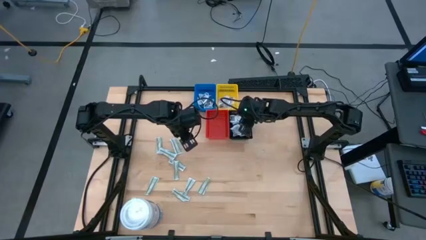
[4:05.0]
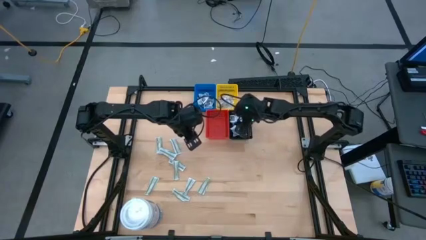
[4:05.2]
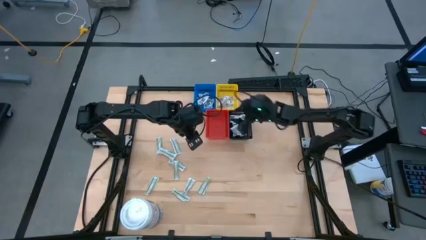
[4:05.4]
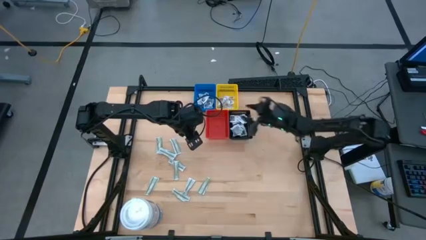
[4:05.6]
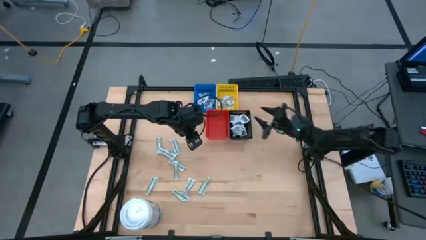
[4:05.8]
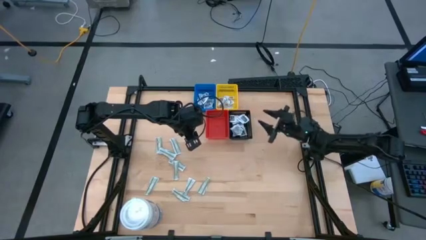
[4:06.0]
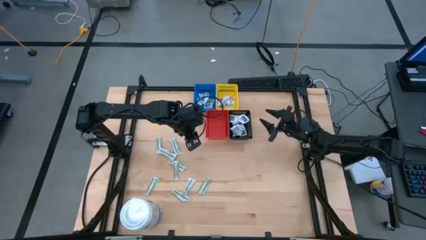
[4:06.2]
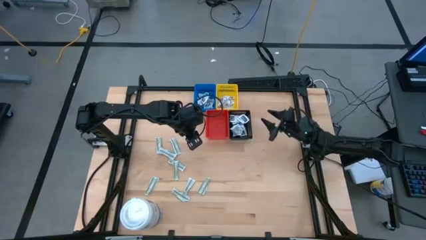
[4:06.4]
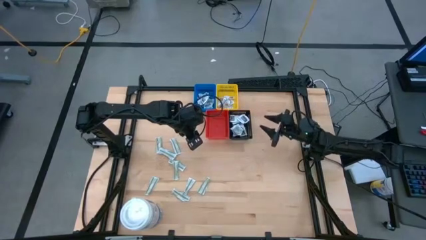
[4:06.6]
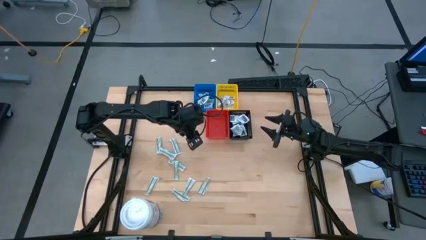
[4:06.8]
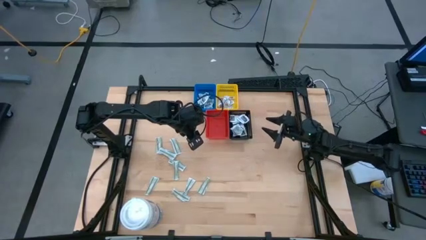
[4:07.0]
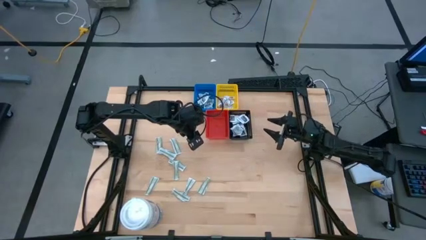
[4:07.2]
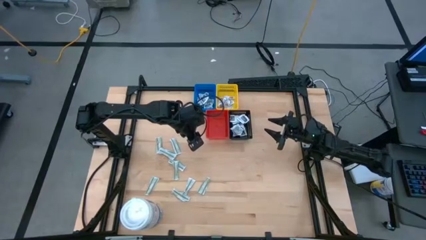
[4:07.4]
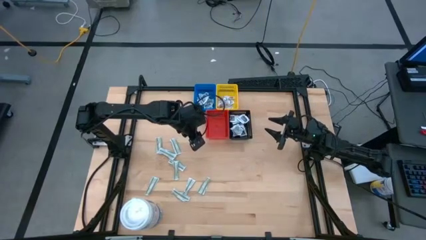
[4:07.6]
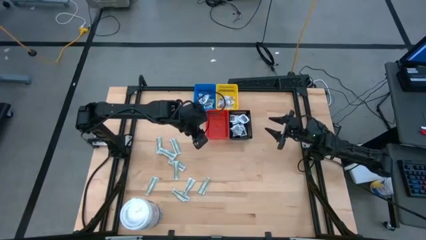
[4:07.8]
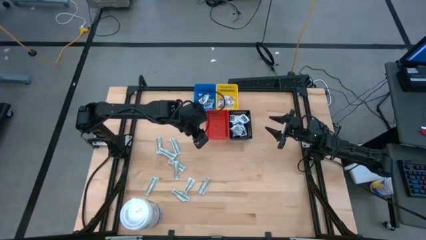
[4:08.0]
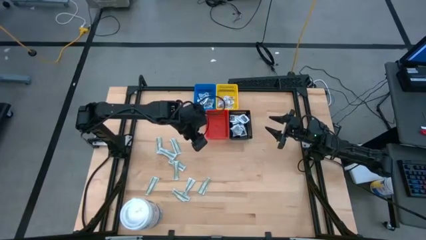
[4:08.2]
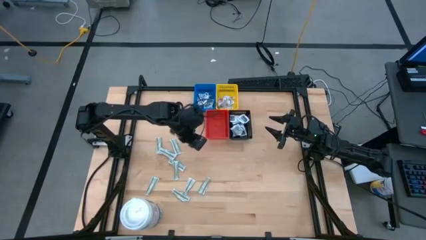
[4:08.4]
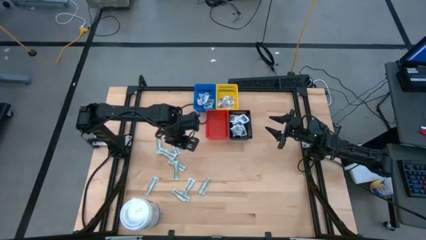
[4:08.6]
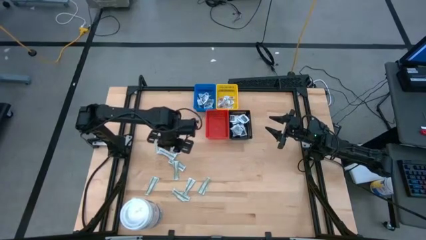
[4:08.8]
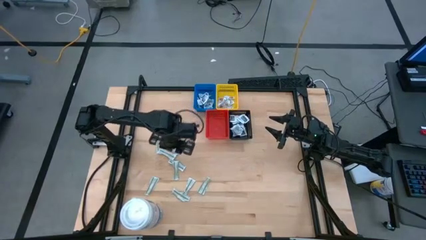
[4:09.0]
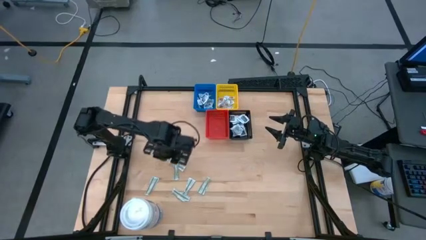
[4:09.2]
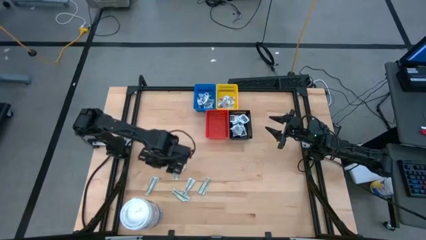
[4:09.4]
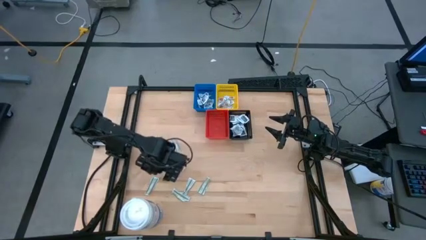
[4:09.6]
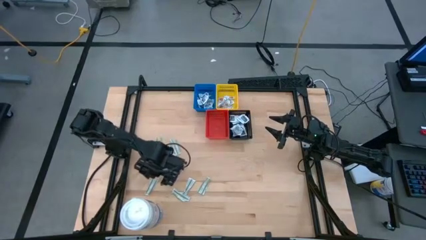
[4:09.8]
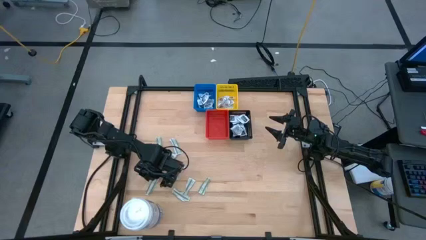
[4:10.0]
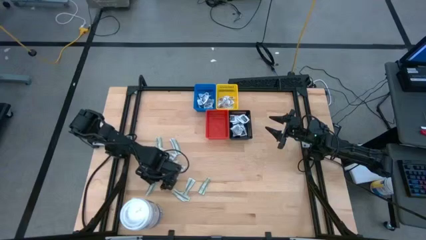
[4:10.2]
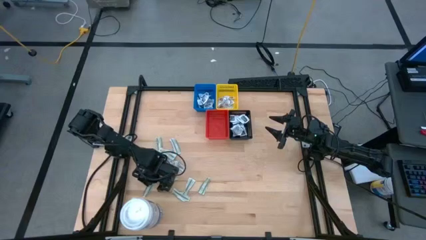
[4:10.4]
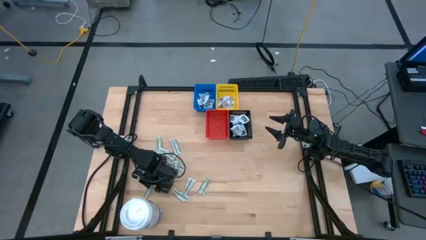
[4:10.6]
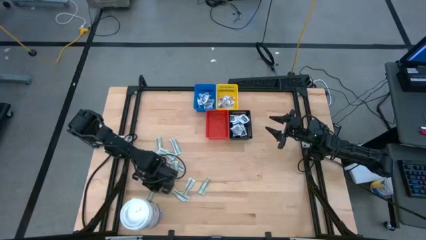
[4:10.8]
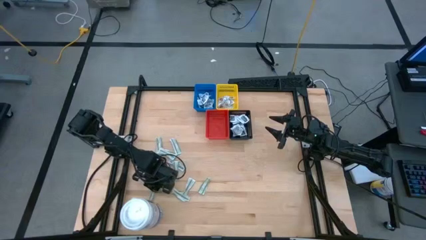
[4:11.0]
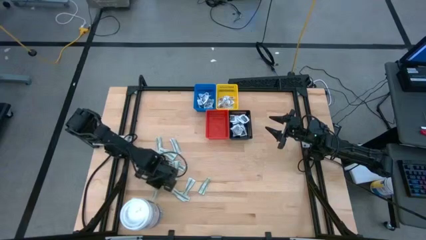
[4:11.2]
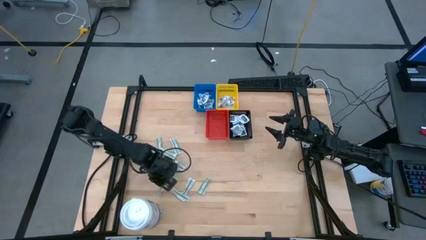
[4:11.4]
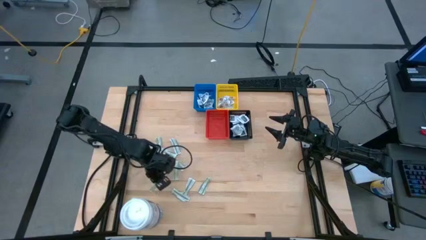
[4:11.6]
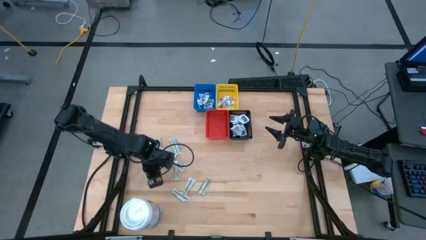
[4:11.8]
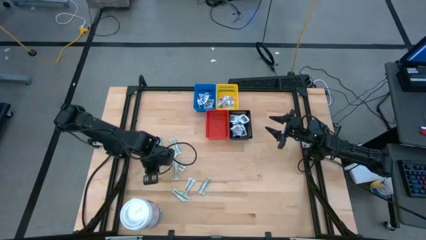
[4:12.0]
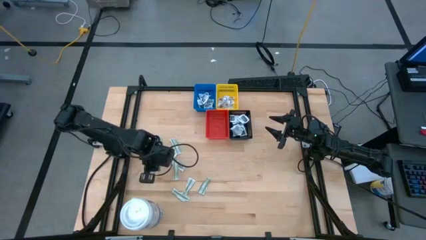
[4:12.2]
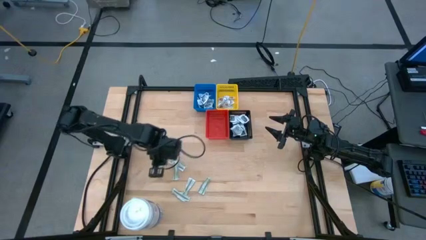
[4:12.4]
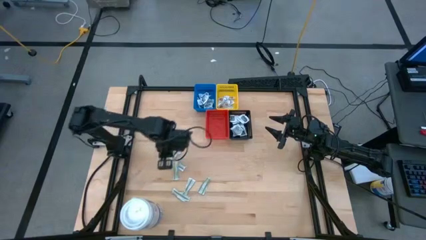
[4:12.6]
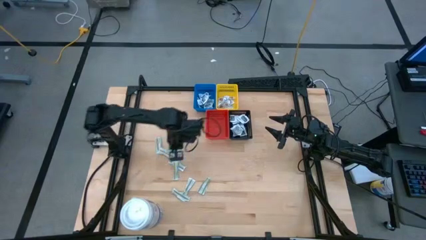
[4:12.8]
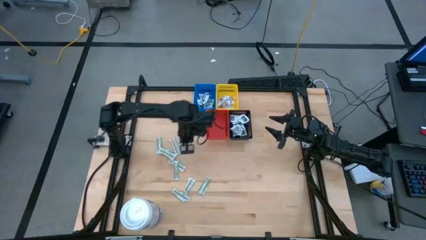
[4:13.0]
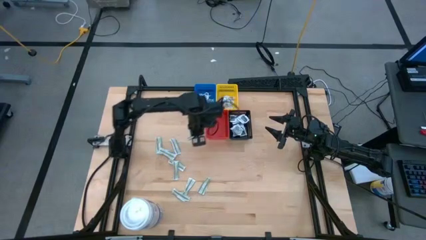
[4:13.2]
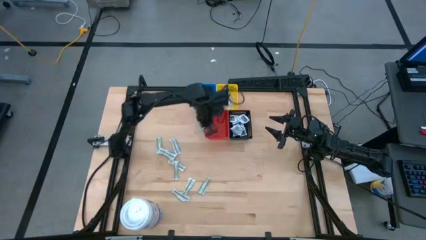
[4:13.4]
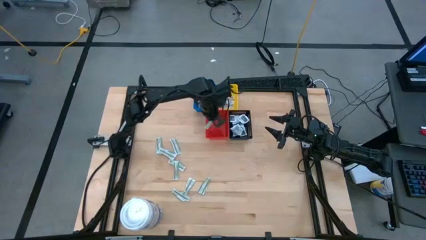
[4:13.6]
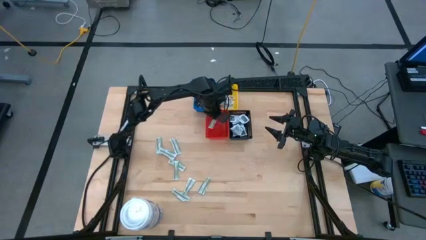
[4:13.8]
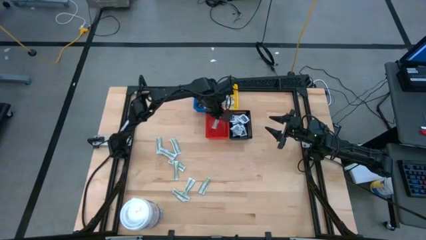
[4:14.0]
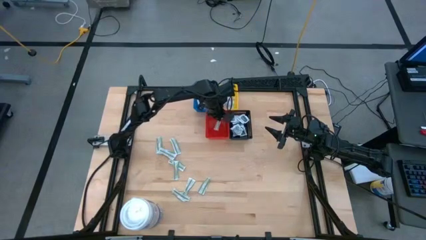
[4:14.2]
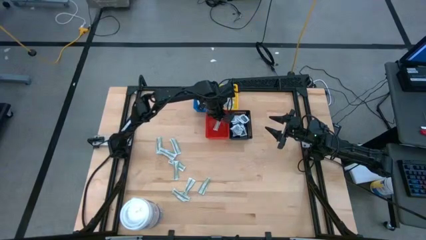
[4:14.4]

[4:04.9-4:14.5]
Task: Pick & Place First Aid Supplies
Put the bandage pack into the red bin

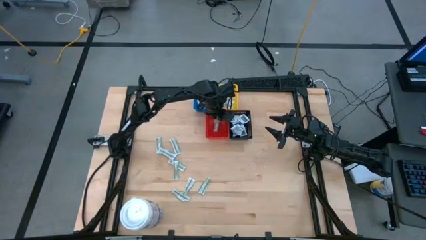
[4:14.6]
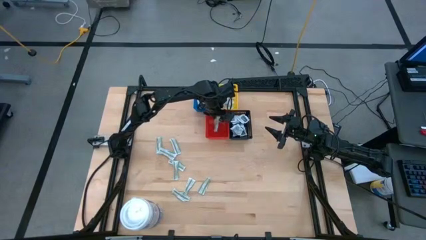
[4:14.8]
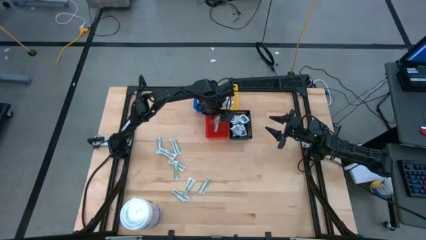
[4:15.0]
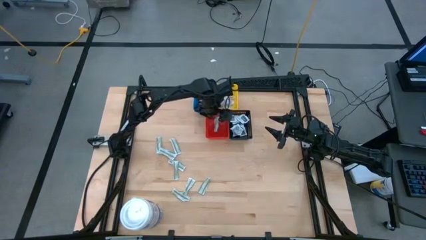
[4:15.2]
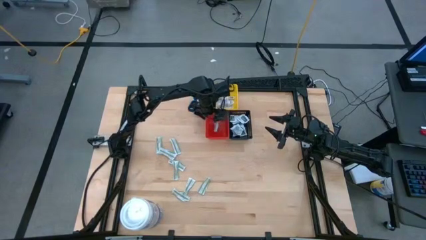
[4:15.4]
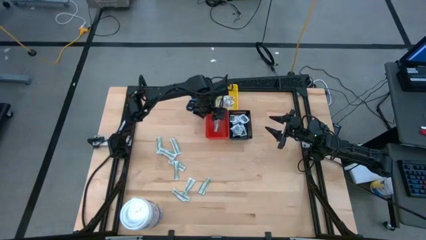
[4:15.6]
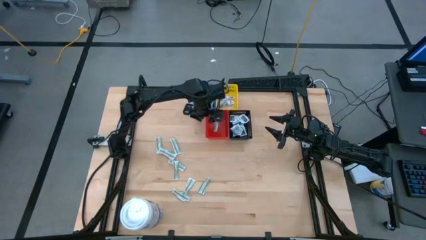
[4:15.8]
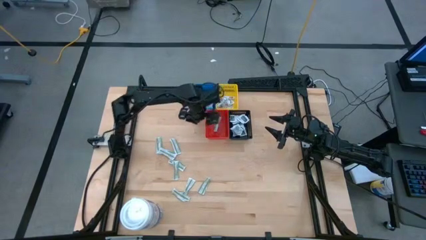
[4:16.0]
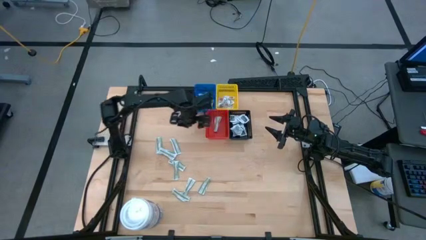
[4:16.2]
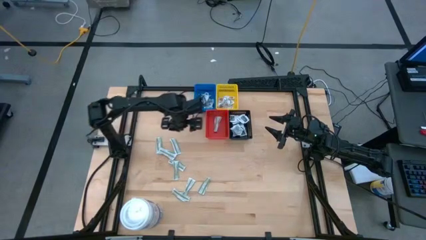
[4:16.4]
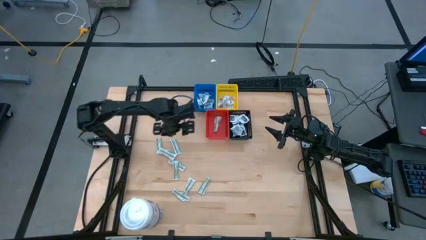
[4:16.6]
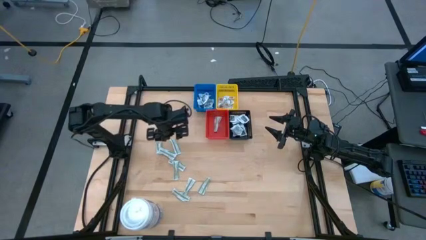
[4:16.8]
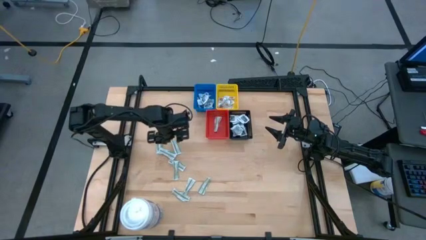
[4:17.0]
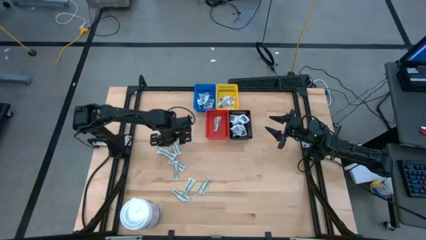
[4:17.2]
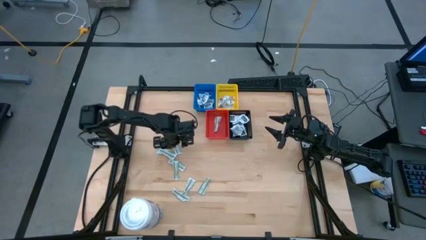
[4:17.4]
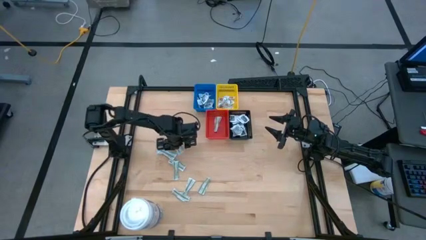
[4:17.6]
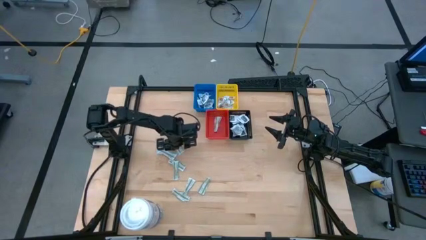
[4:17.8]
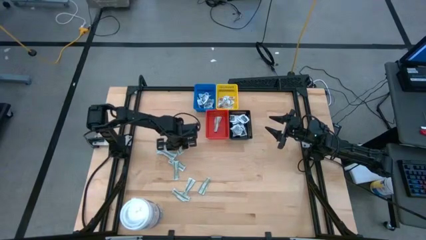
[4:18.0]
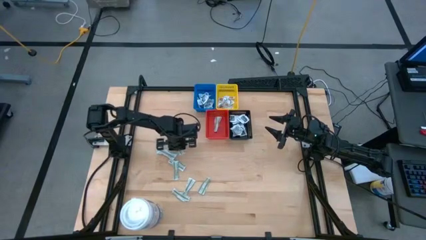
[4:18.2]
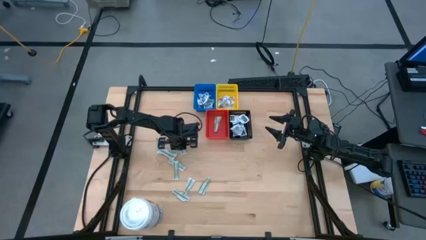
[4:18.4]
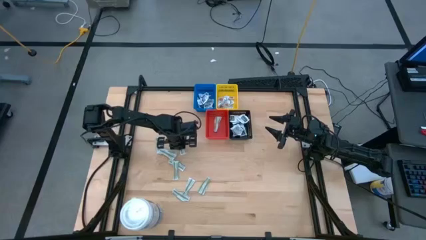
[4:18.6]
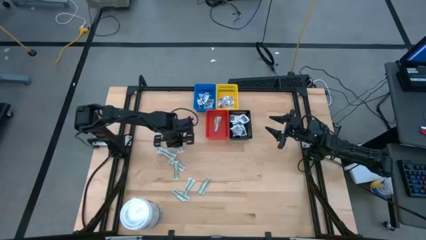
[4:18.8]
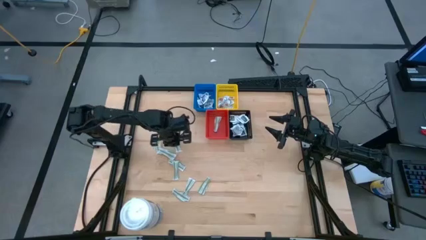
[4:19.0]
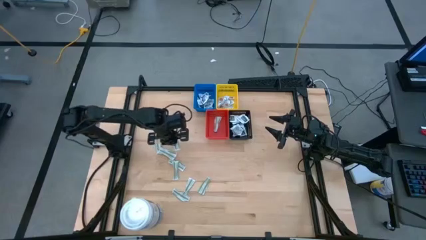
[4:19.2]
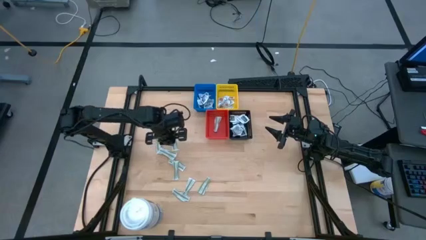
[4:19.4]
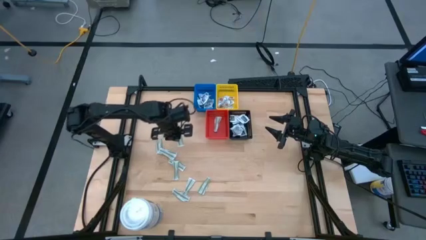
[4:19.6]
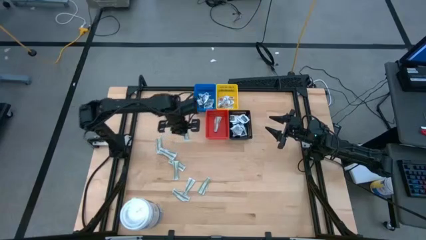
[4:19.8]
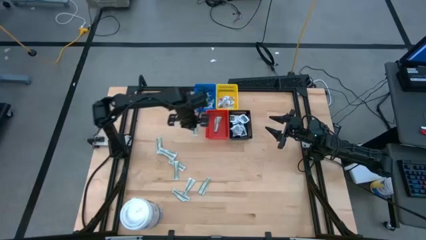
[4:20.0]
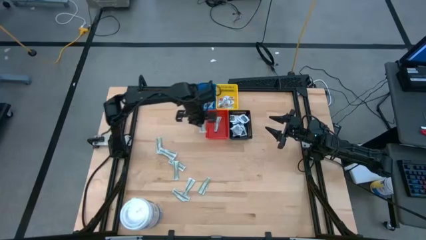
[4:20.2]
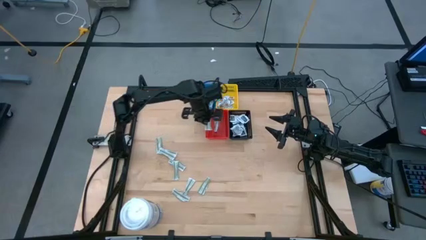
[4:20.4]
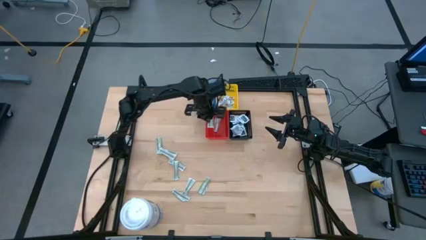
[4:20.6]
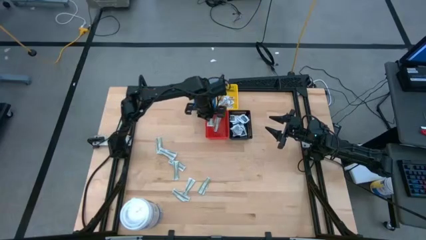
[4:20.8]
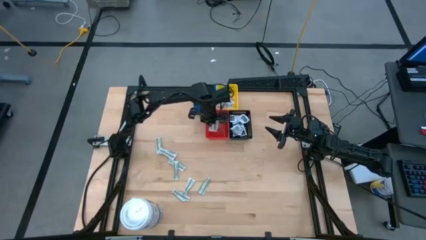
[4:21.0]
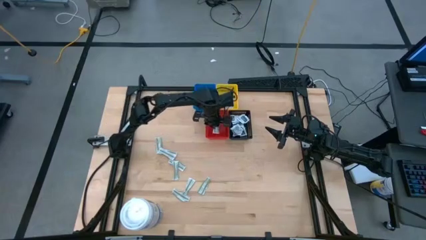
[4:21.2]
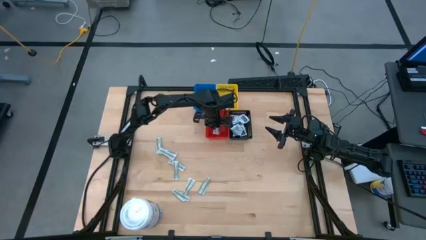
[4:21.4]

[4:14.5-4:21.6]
Put the bandage pack into the red bin
